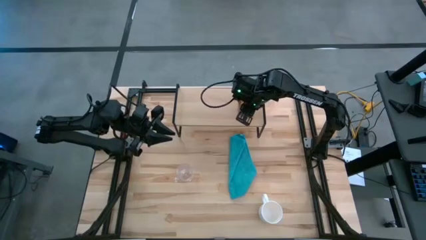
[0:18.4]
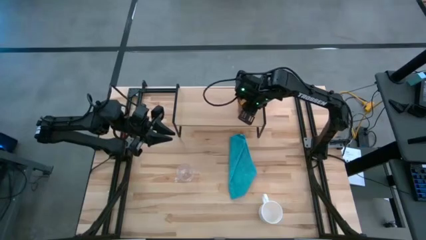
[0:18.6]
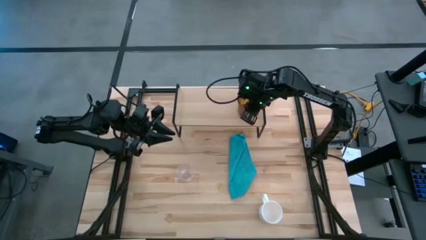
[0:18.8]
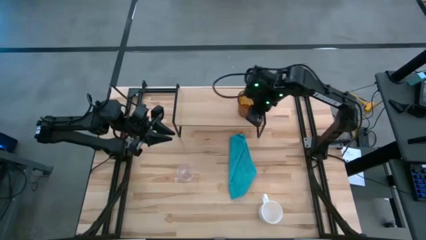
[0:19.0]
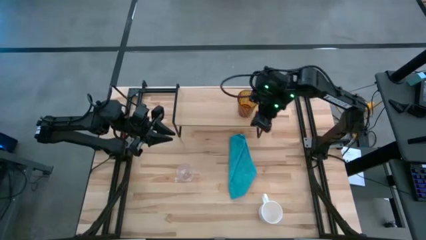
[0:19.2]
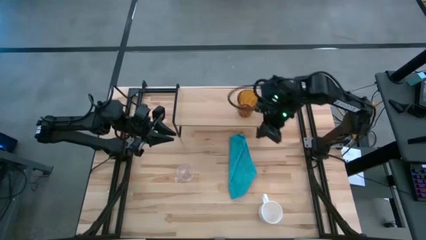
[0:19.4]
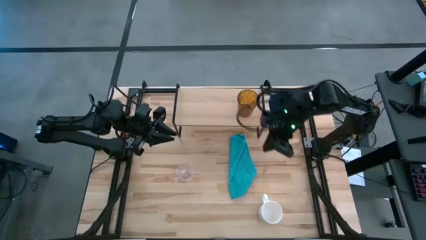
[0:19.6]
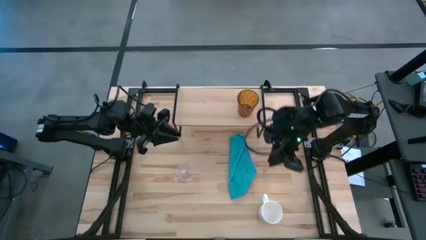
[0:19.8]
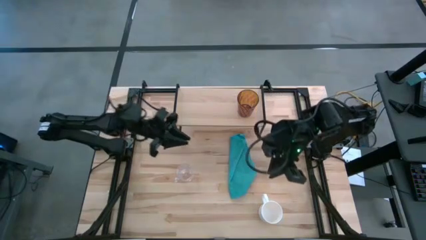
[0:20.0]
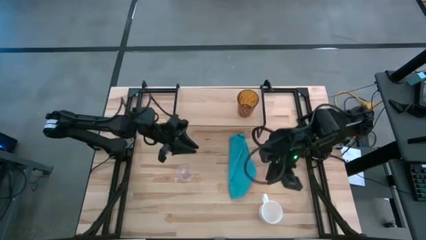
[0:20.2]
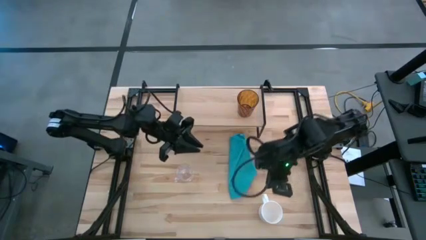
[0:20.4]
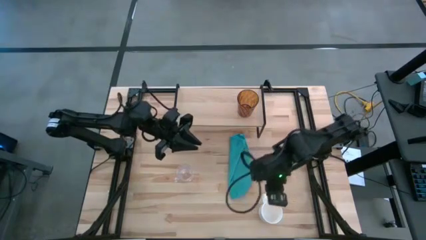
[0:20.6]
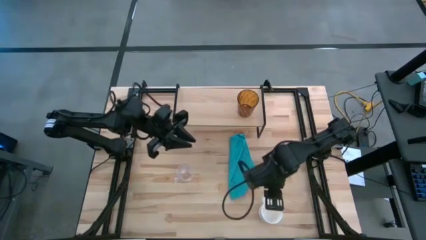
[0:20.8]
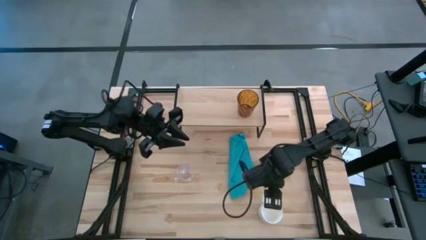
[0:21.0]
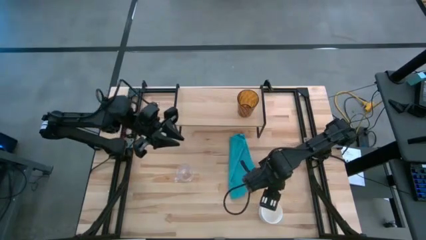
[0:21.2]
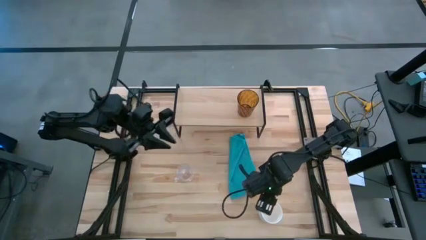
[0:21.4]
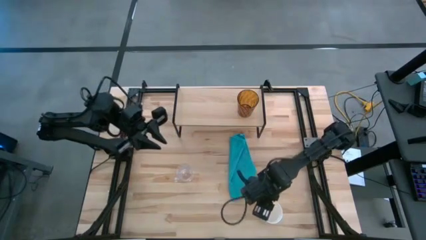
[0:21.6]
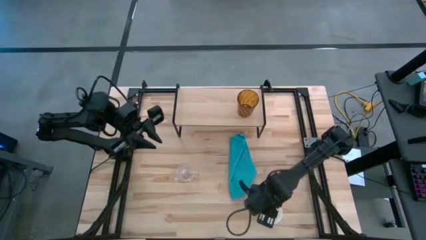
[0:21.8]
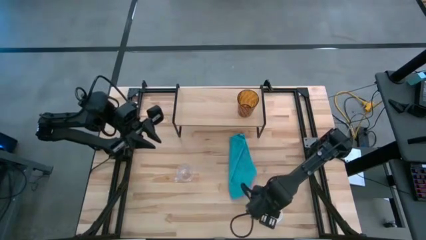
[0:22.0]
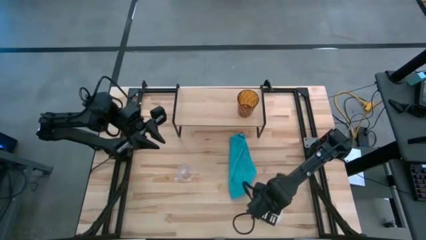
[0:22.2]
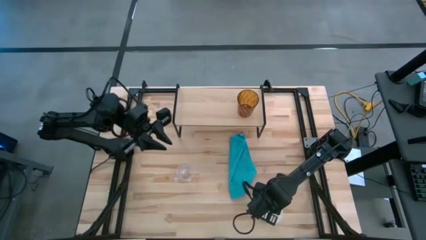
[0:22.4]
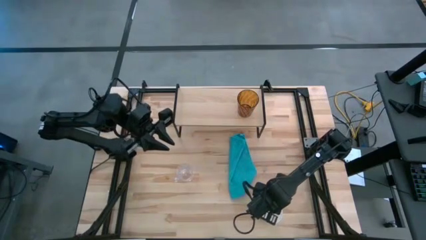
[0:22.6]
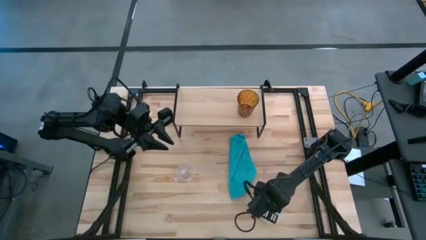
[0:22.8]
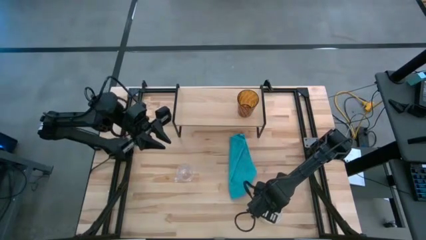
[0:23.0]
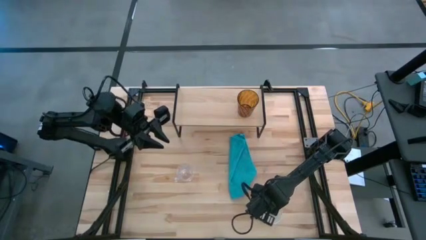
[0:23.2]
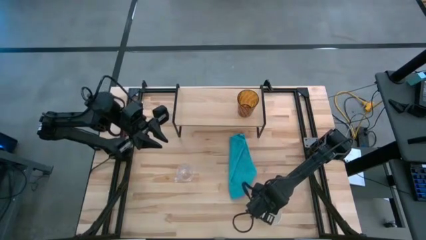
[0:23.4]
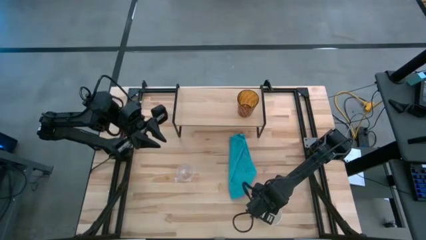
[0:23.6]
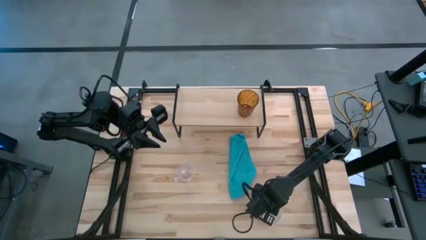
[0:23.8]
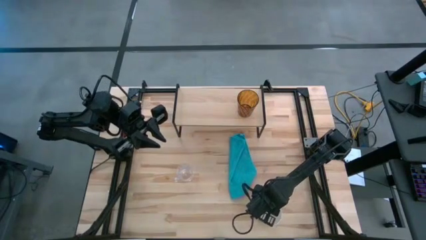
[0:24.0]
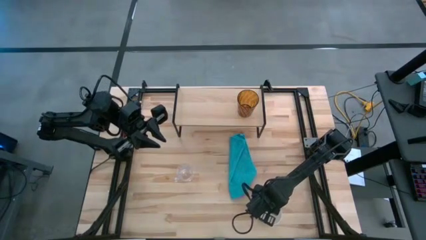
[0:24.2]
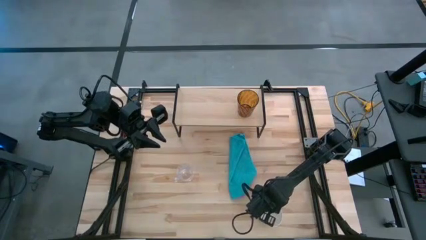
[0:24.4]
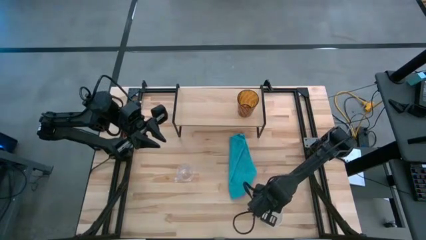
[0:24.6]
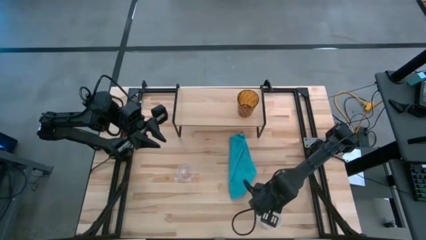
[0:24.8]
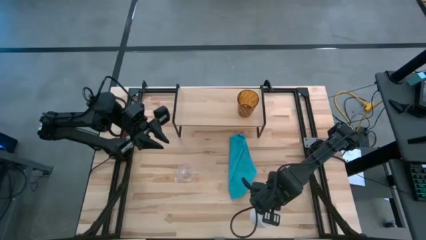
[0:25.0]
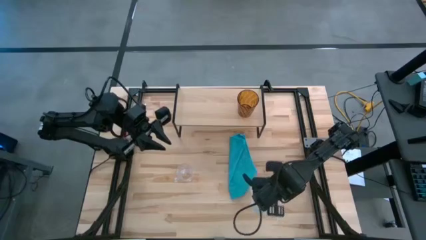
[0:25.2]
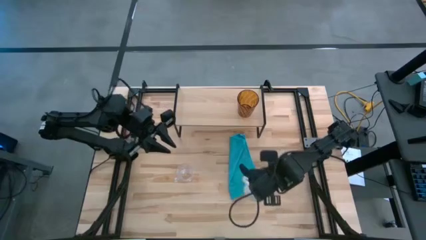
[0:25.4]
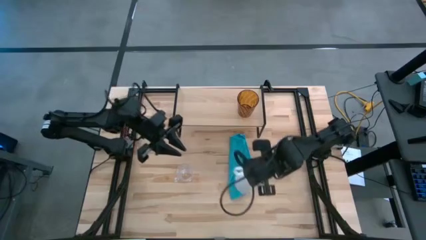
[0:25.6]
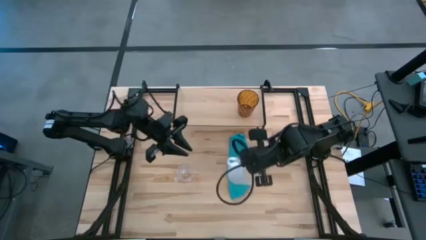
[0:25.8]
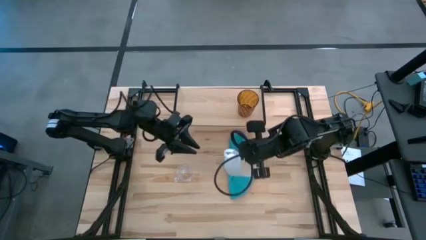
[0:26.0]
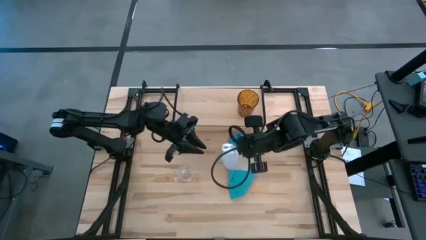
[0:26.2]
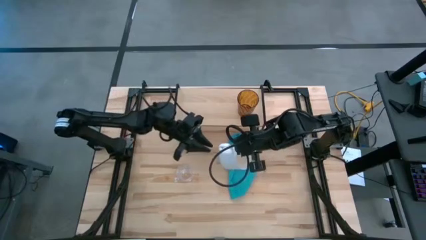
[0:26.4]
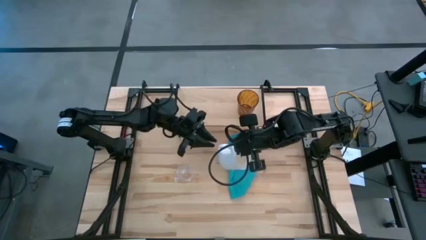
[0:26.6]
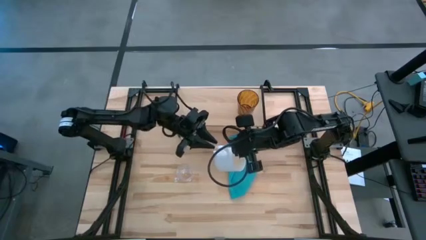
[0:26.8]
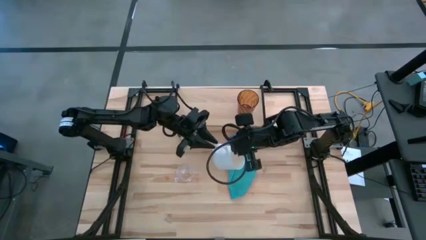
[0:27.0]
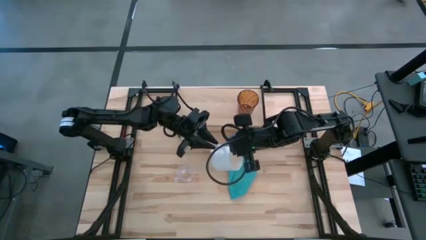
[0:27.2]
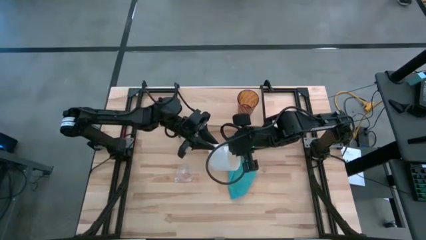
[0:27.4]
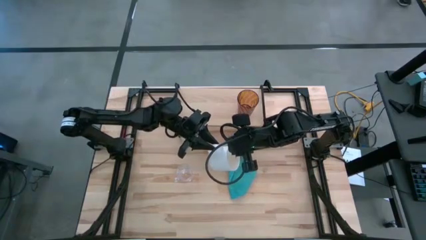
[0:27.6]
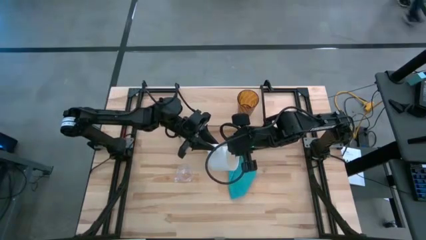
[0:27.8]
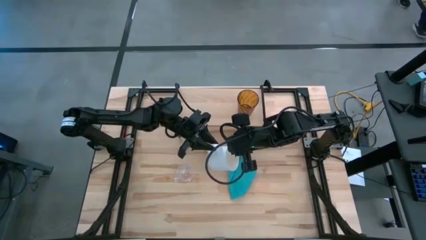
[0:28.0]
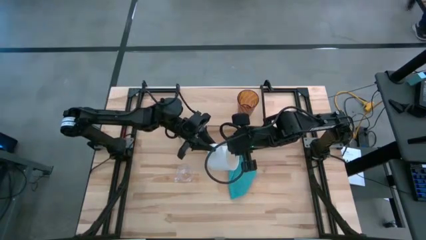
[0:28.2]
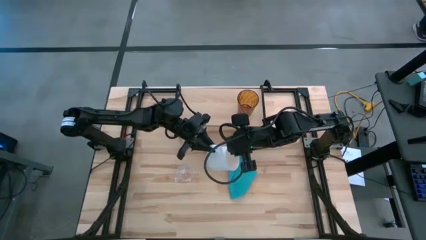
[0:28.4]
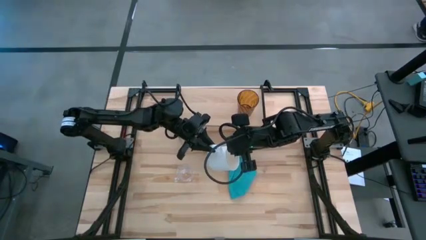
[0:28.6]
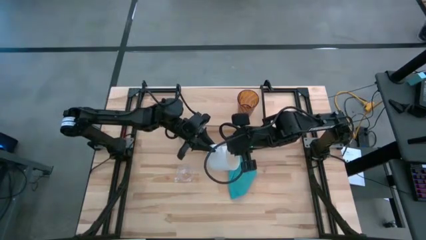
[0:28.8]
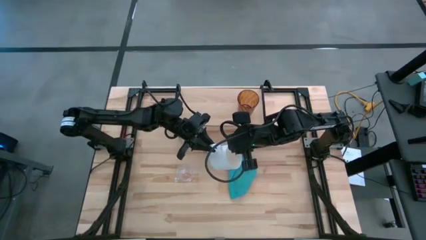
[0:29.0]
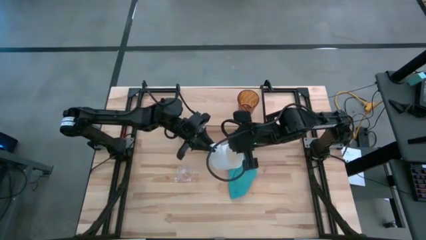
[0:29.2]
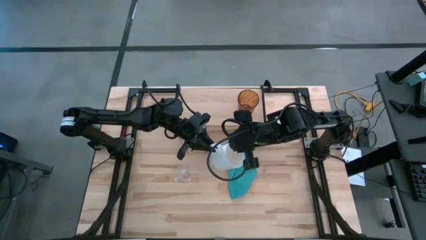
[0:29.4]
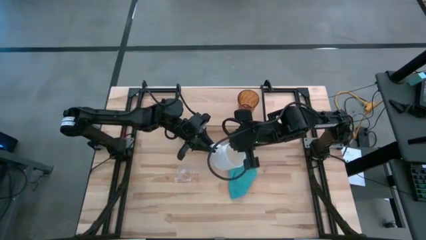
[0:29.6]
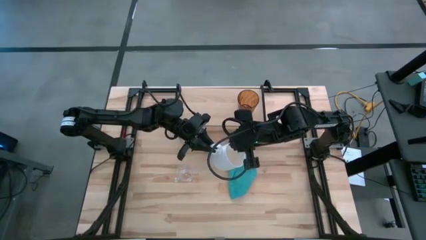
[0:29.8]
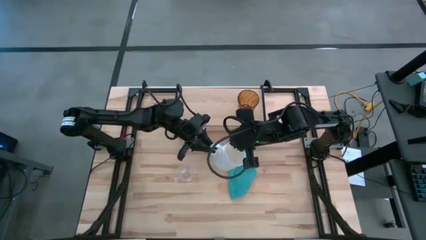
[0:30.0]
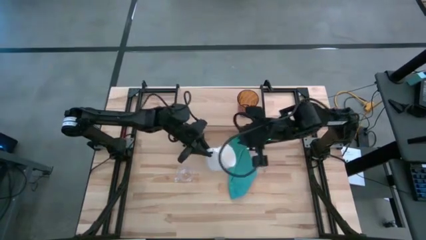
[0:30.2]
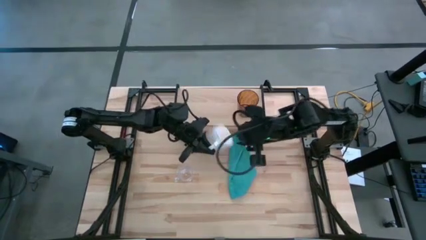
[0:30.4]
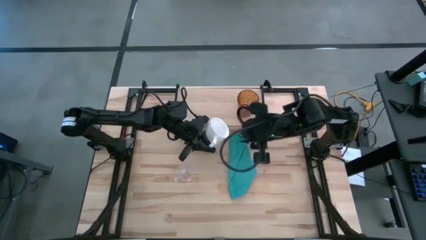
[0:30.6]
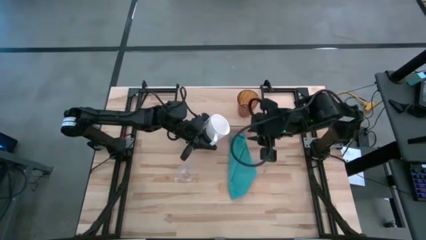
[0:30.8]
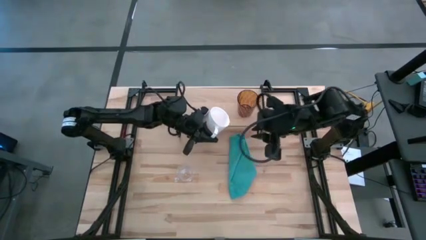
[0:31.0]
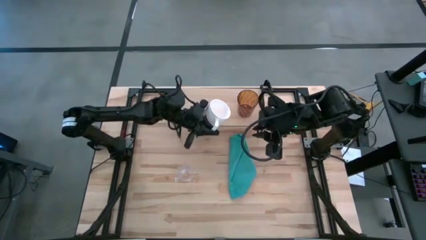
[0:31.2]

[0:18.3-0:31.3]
Task: Stack small to large cups/mugs on shelf
Put the white mug on the shelf
